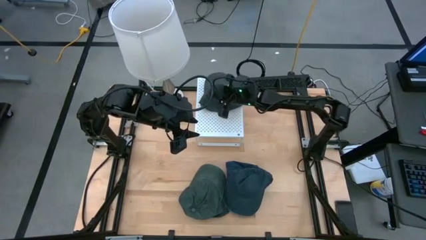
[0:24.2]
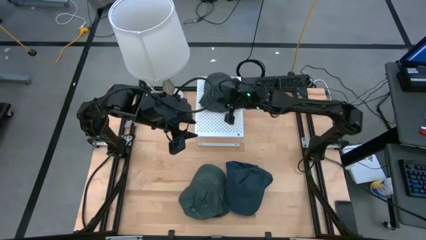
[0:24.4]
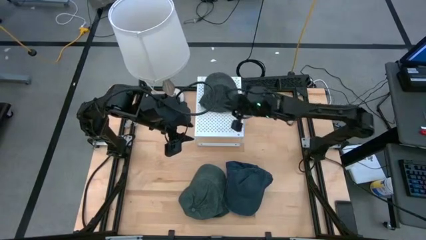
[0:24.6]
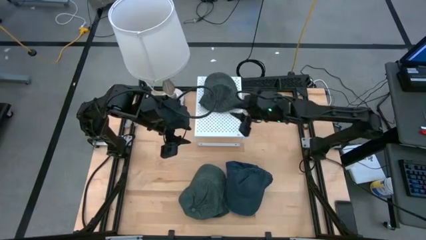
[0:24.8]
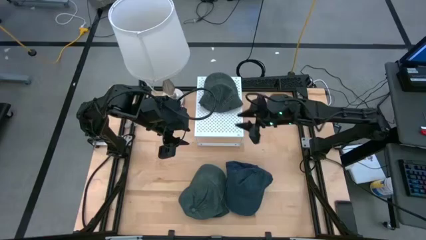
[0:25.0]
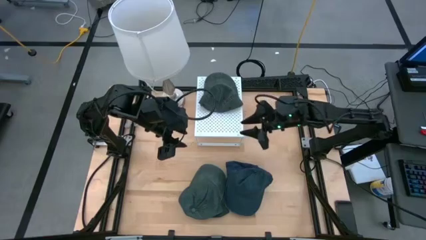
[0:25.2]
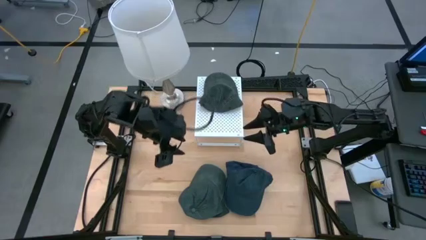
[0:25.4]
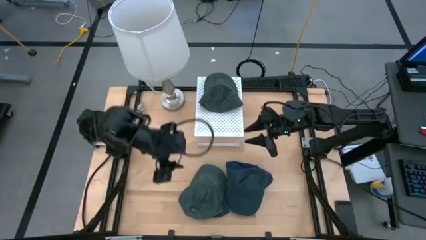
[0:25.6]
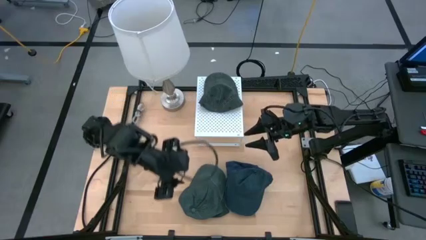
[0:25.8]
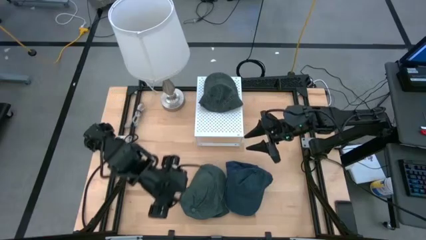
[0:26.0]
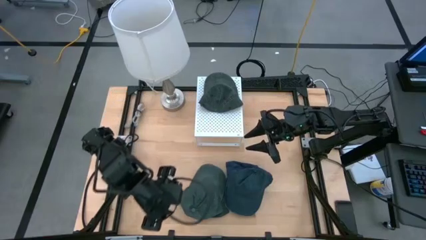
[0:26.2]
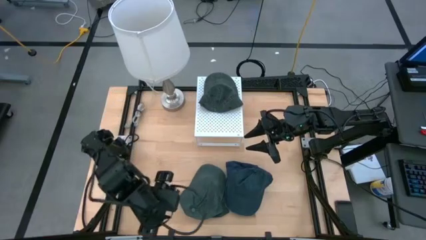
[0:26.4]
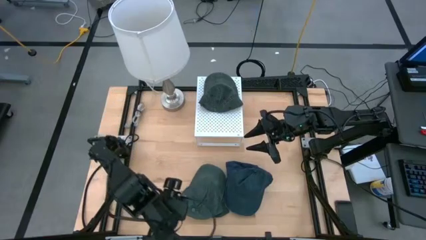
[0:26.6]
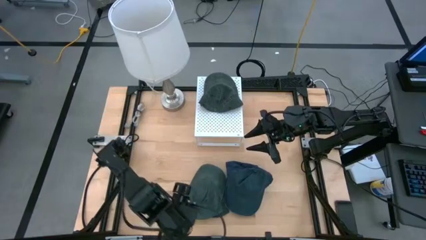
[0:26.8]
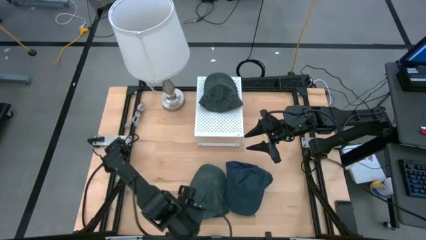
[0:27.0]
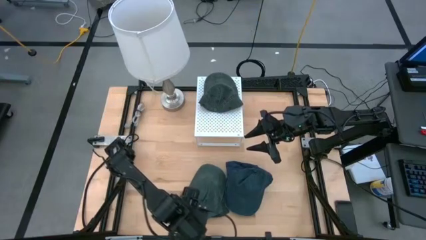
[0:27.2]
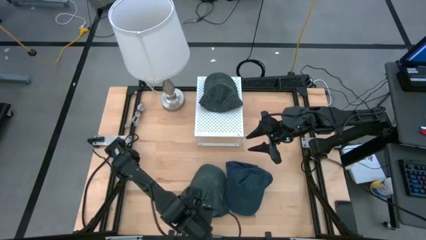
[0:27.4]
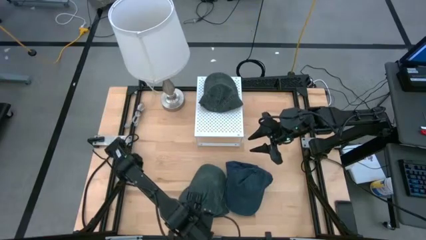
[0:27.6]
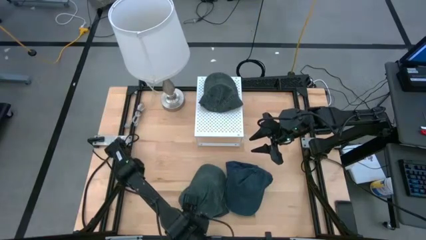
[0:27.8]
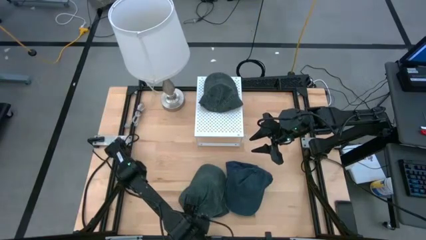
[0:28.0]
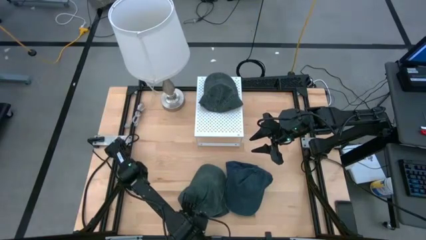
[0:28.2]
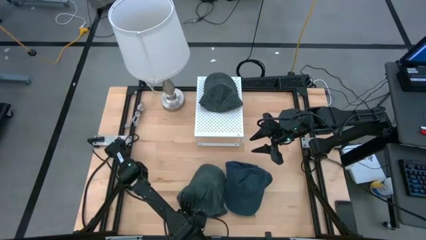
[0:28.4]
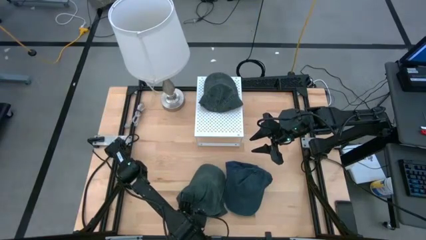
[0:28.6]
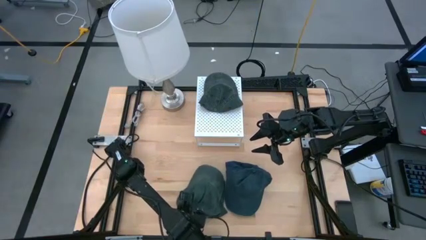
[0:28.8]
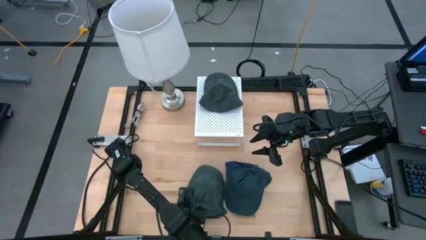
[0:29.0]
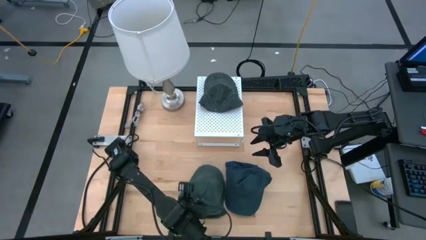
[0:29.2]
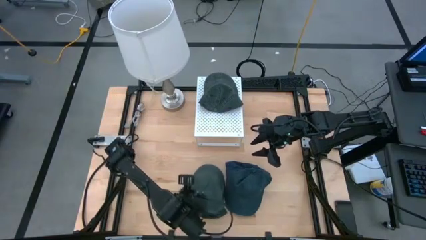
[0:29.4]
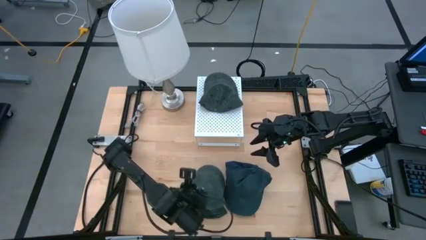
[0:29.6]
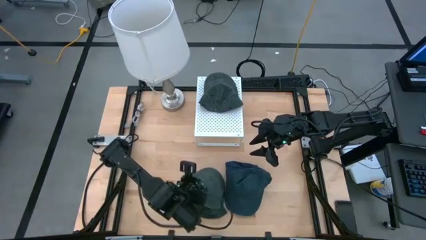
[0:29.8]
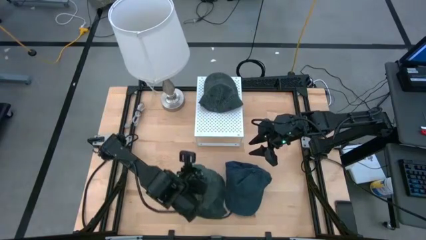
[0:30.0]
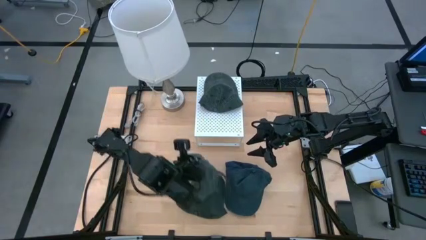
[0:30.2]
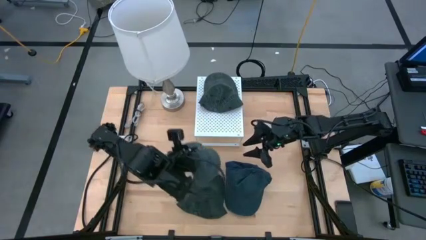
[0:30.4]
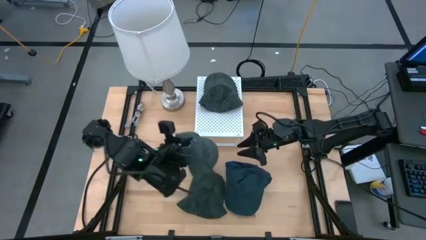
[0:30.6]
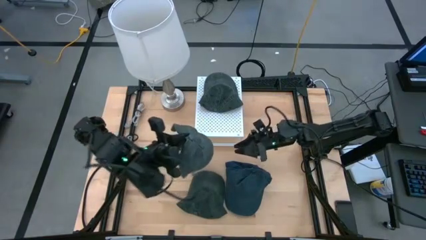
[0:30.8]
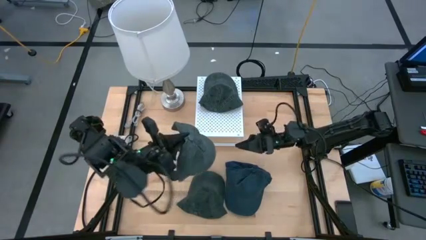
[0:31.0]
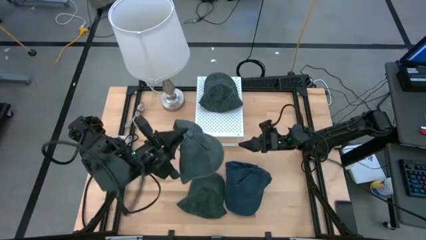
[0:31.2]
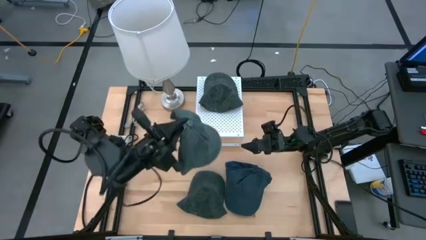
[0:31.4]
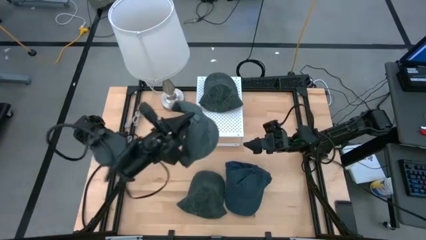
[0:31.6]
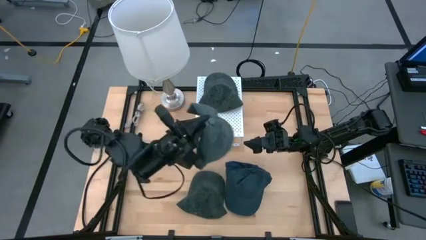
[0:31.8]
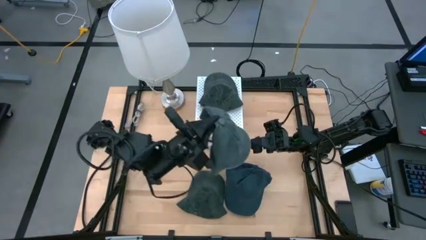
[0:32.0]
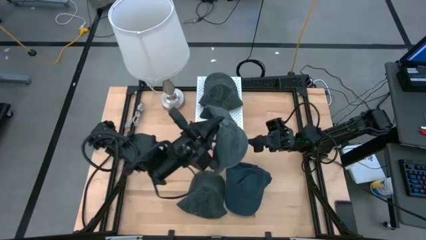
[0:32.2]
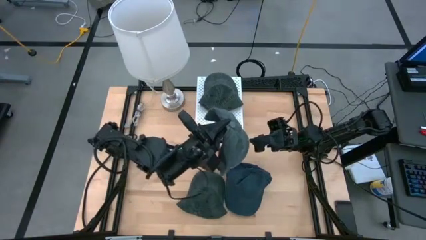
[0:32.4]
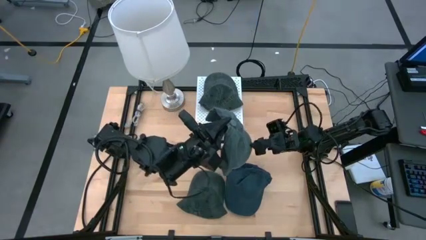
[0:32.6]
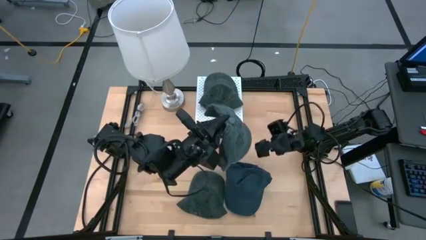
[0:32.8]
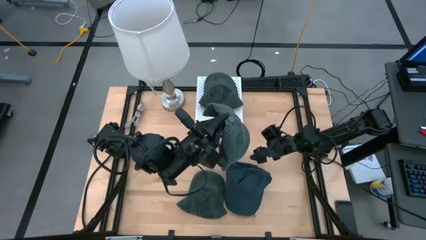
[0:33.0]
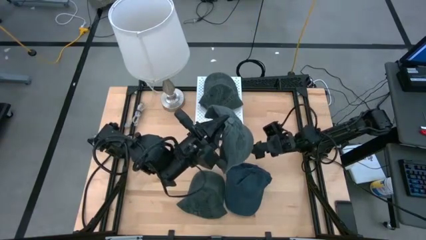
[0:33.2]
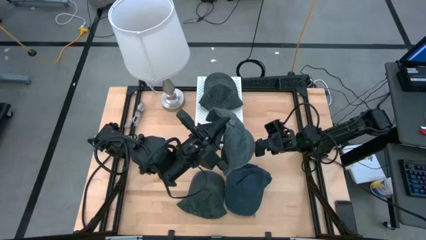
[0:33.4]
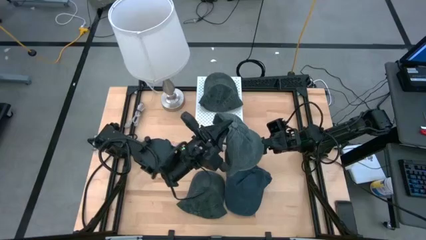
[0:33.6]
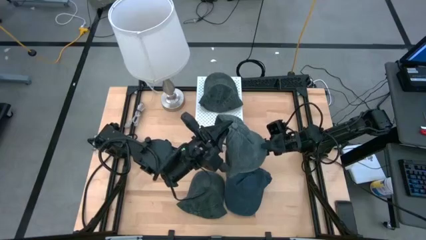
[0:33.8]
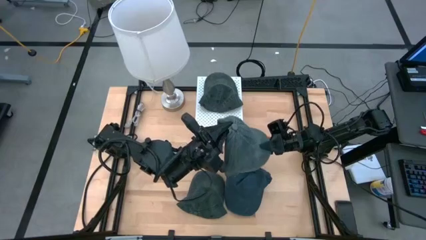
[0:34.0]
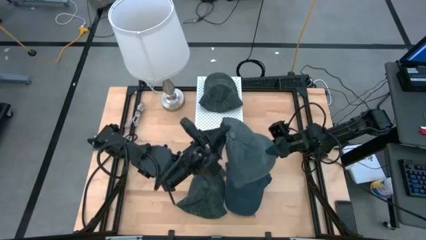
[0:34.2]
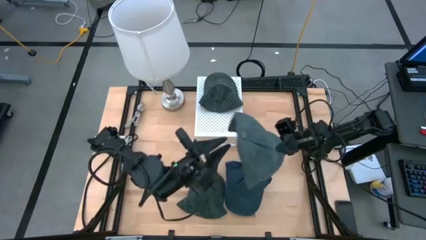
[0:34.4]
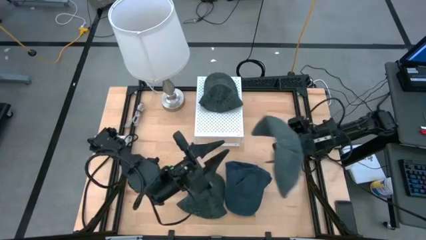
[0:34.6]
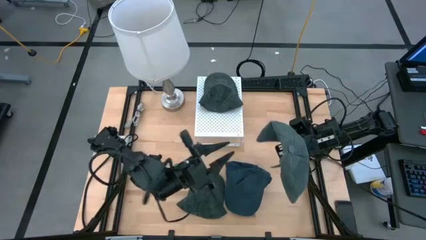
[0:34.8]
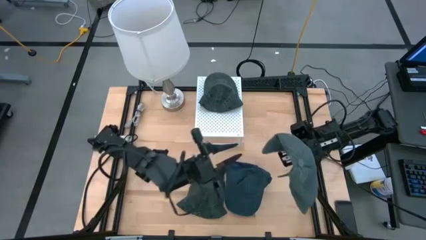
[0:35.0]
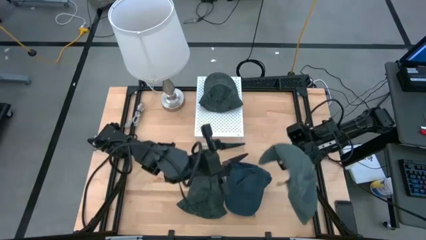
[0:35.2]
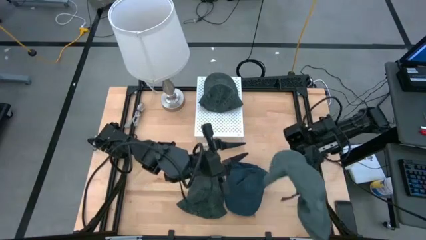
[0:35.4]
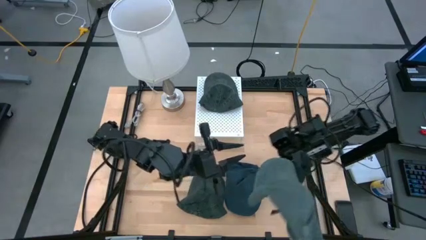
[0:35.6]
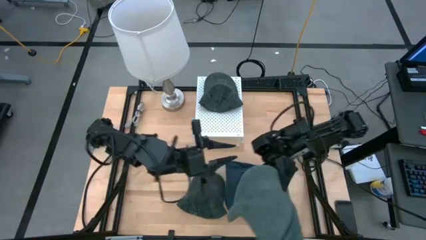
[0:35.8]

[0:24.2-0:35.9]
Task: Pick & Place hat
Stack the black cap on top of the other black cap on the shelf

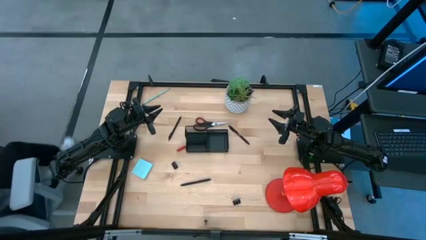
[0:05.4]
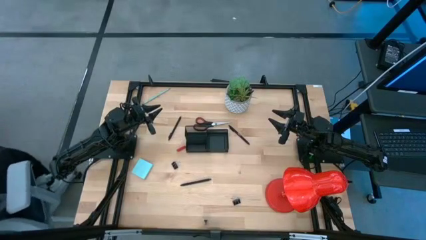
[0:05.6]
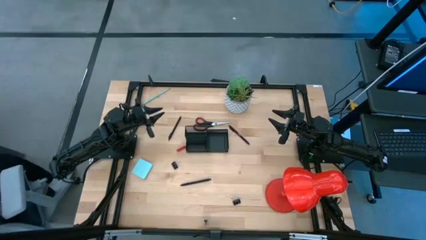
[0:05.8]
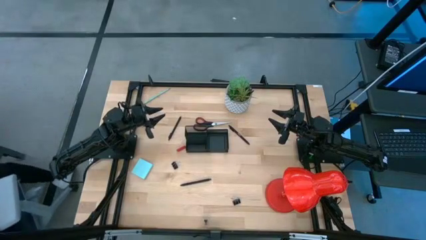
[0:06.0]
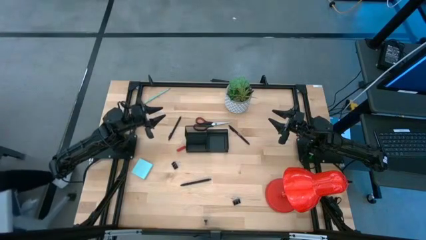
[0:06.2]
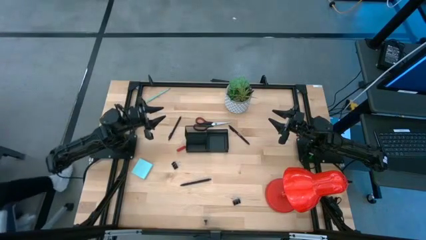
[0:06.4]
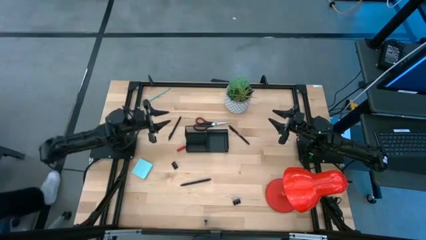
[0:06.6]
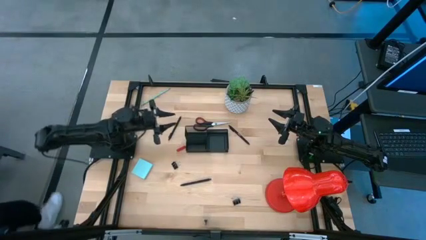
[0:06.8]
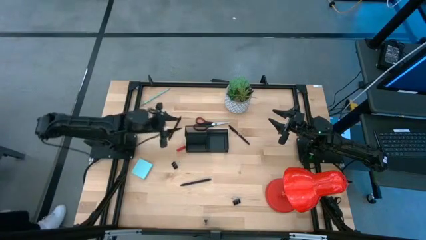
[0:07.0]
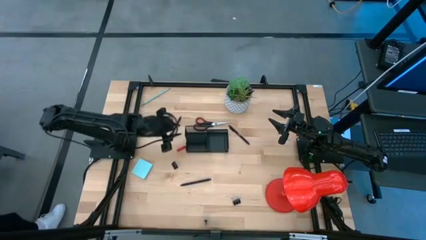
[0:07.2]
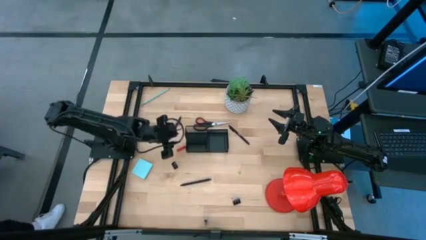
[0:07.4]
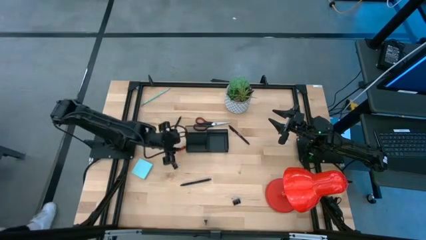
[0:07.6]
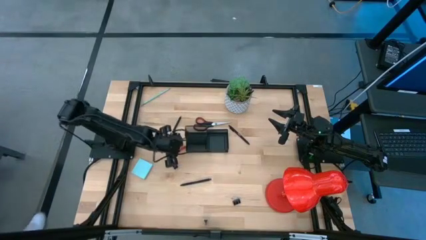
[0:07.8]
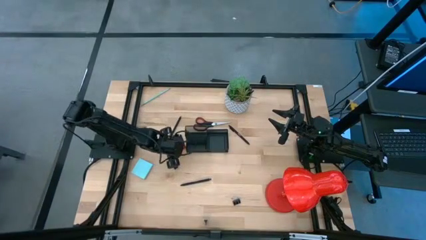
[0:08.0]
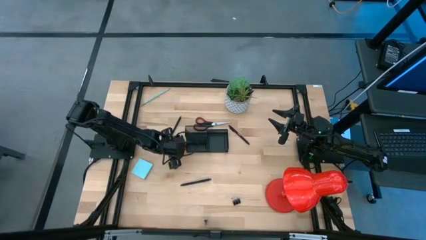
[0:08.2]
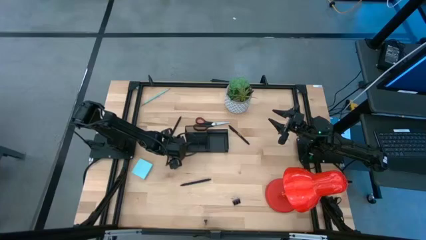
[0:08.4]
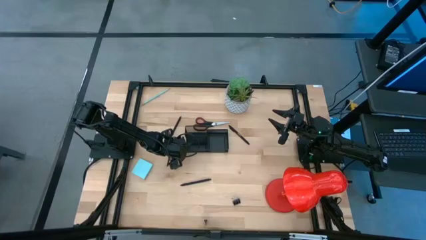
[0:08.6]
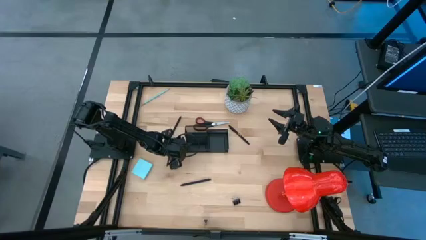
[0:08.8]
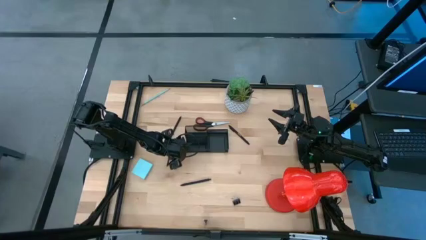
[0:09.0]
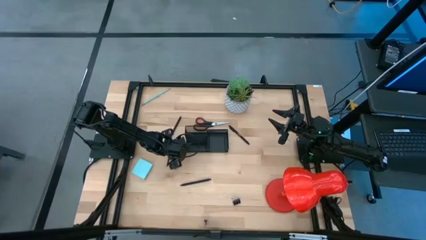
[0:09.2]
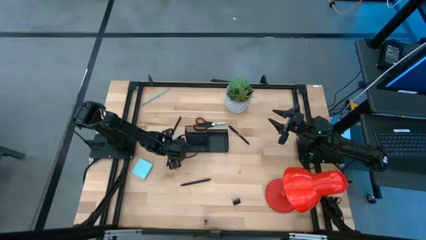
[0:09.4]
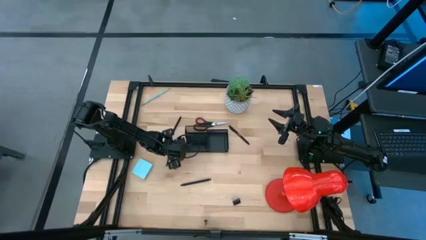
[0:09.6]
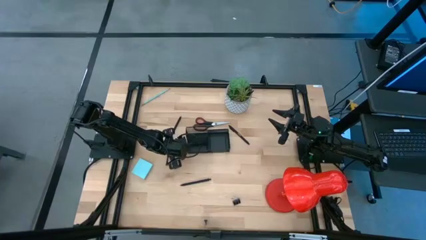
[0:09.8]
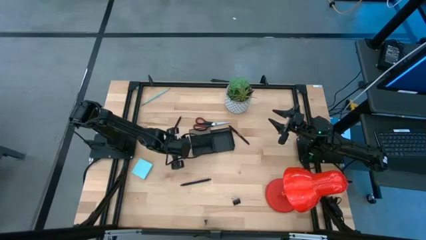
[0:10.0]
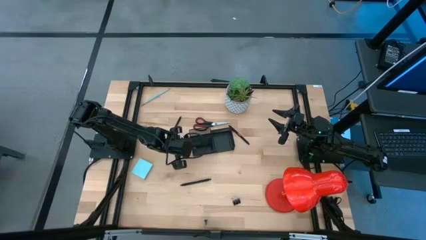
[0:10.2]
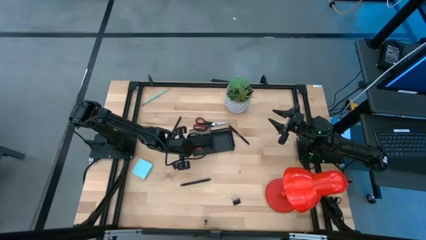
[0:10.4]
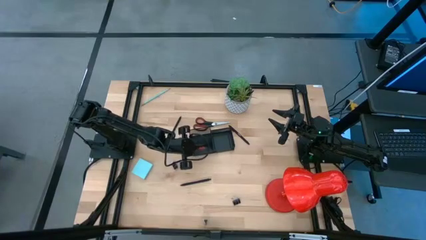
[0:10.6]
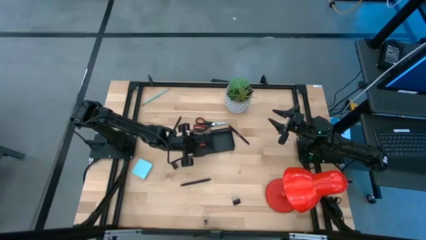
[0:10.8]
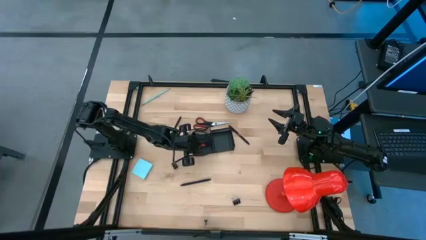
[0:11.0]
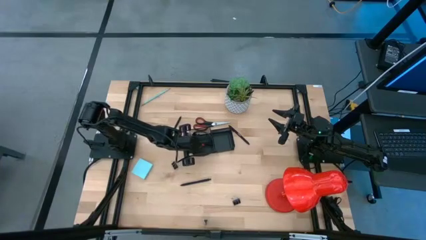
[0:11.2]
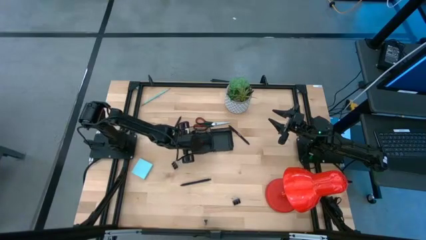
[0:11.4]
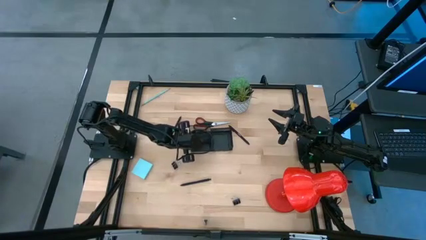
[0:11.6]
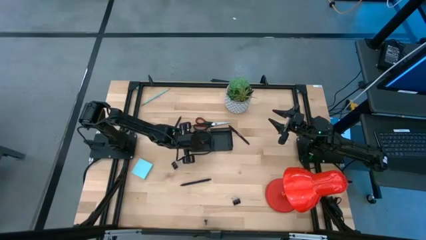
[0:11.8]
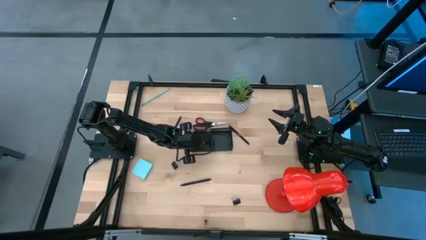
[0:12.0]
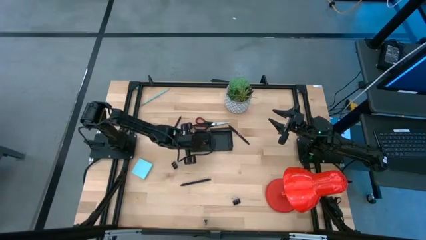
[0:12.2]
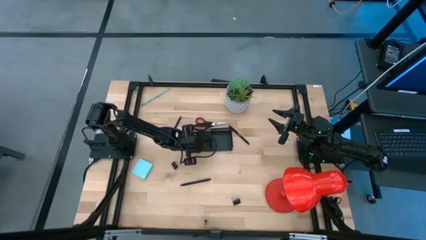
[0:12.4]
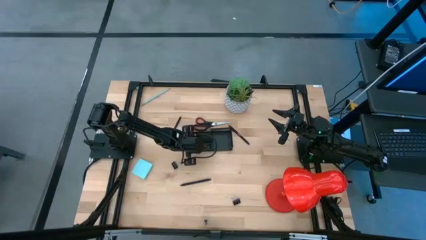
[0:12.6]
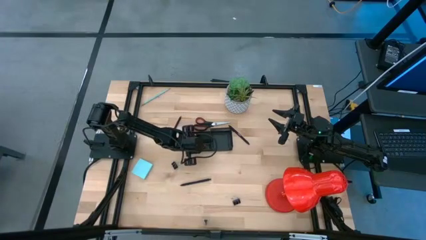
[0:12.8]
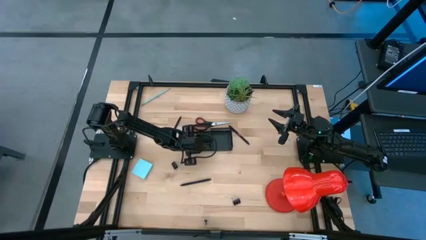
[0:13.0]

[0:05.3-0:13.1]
Task: Pick and place office supplies into organizer
Put the eraser into the bottom left section of the desk organizer
